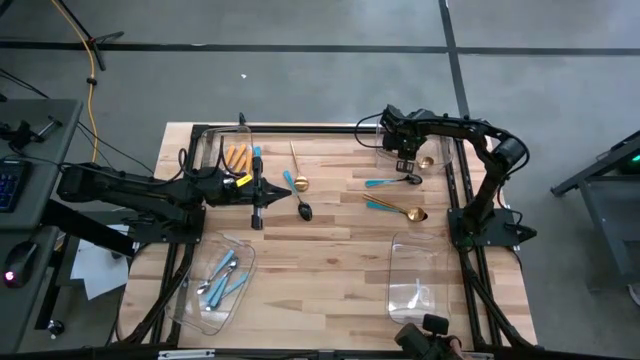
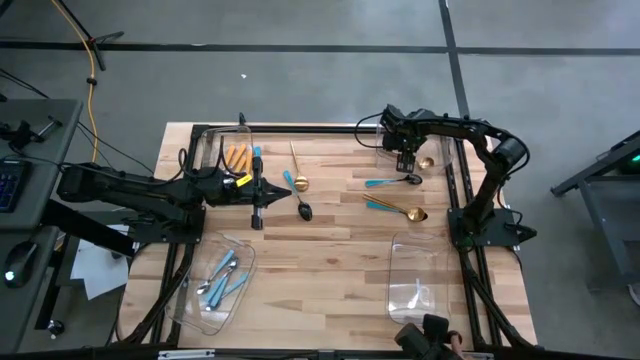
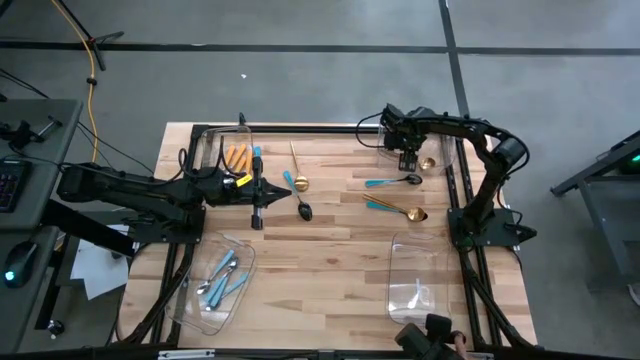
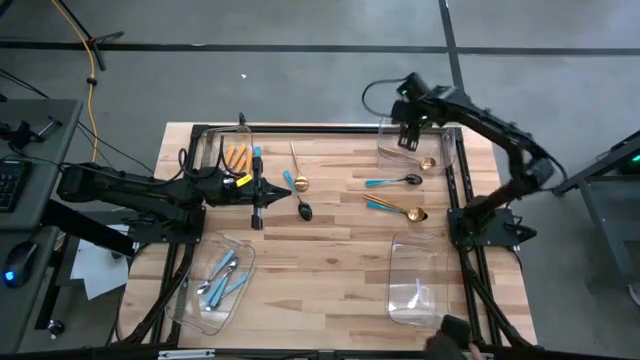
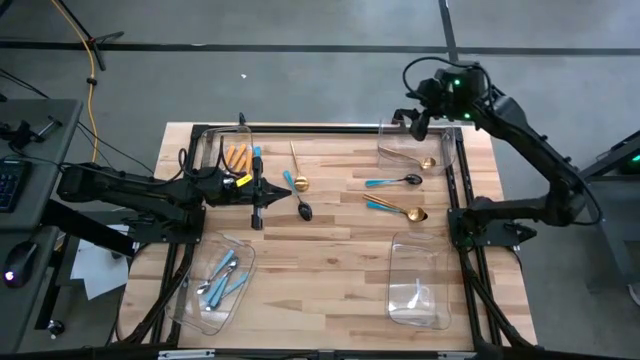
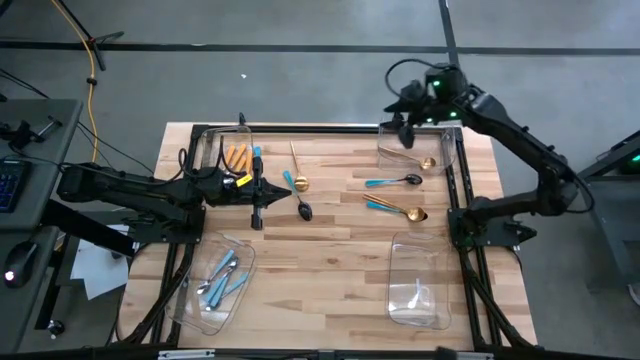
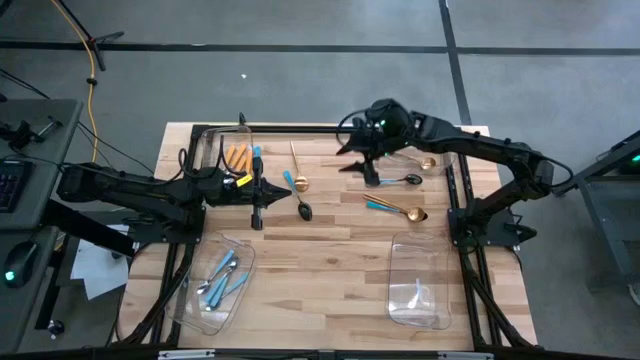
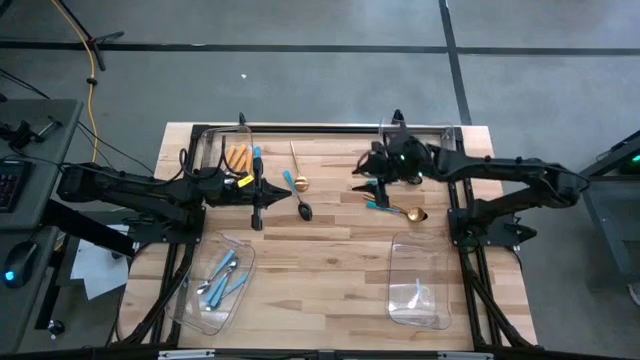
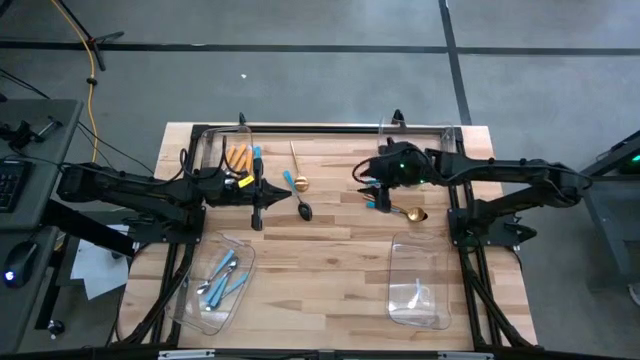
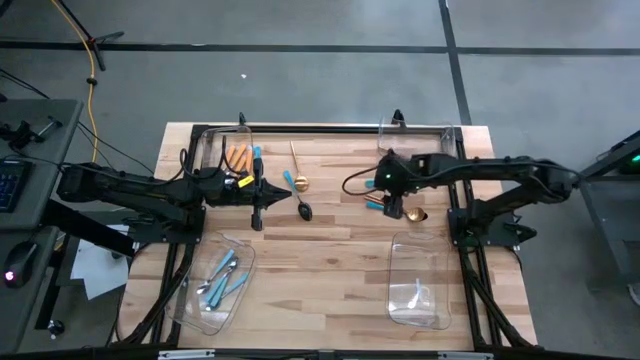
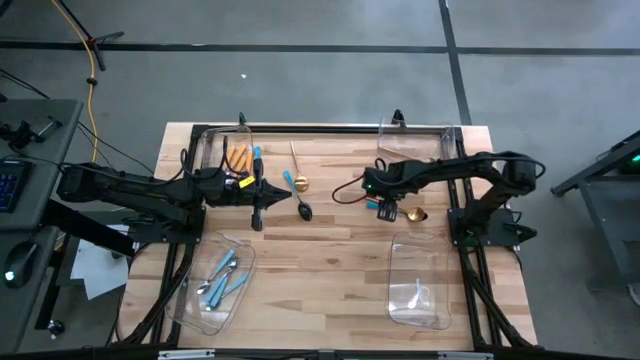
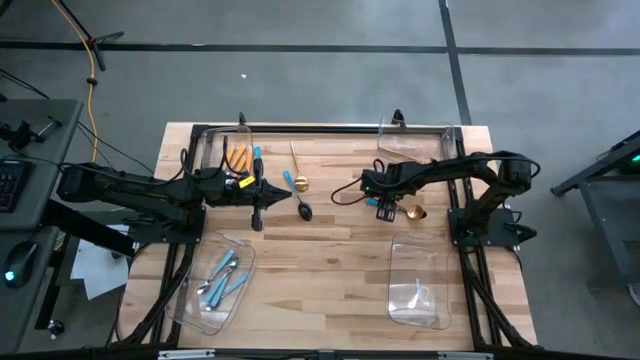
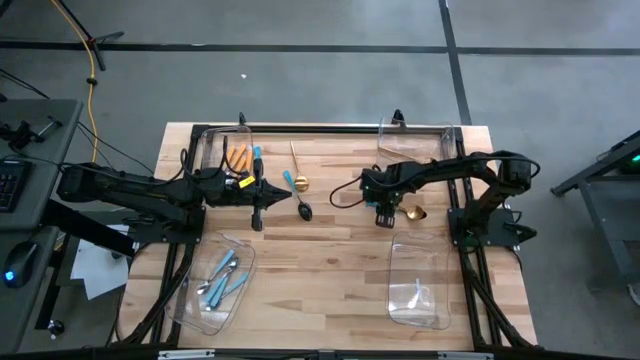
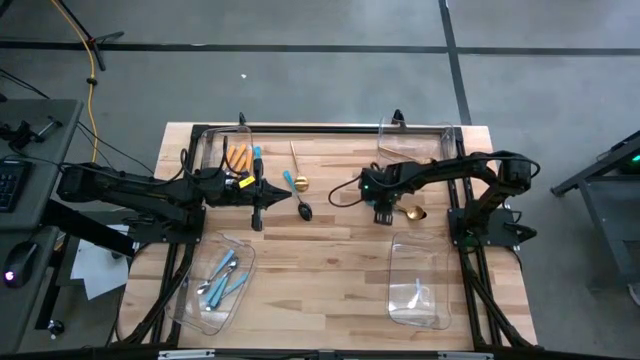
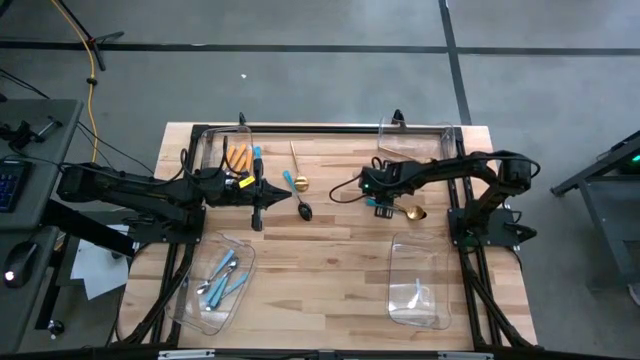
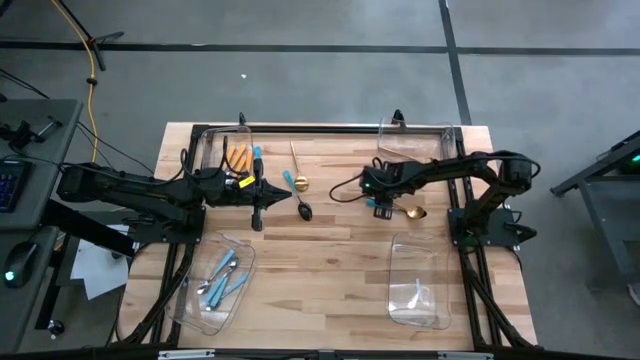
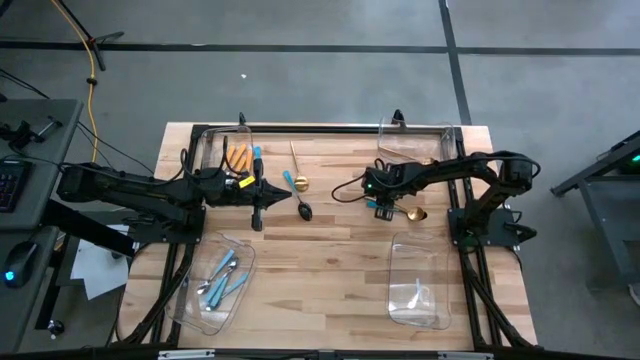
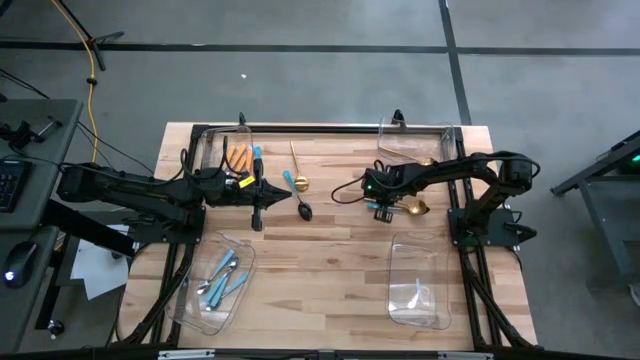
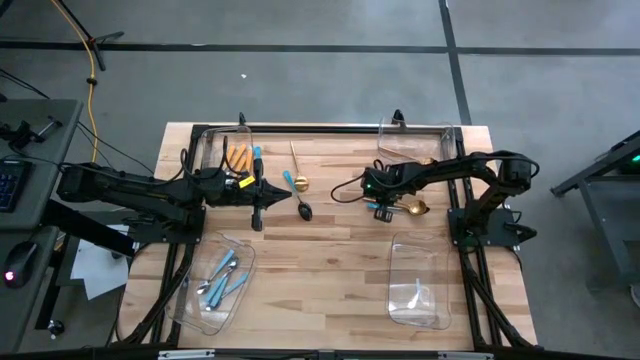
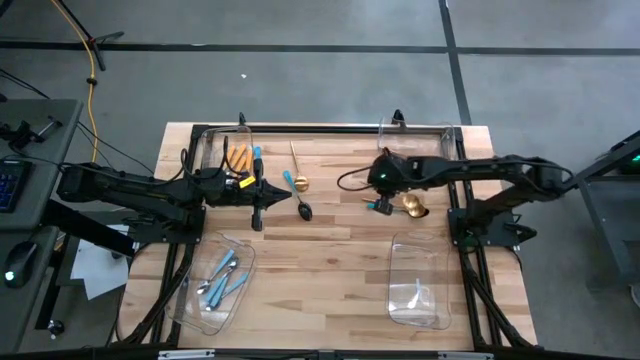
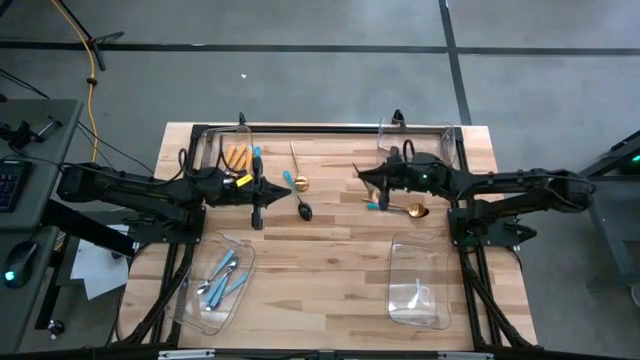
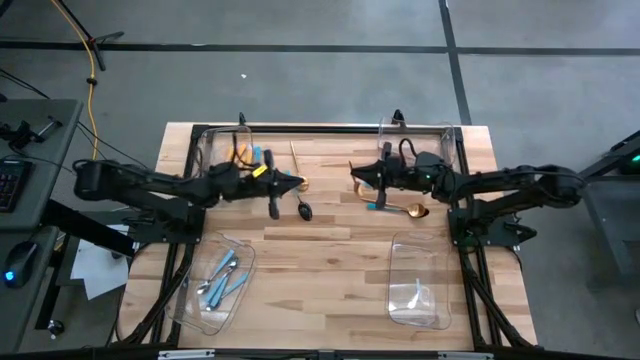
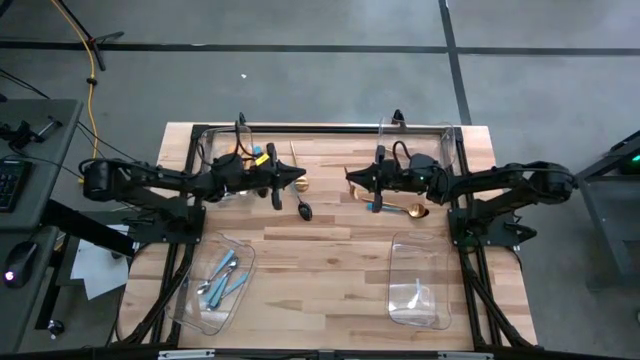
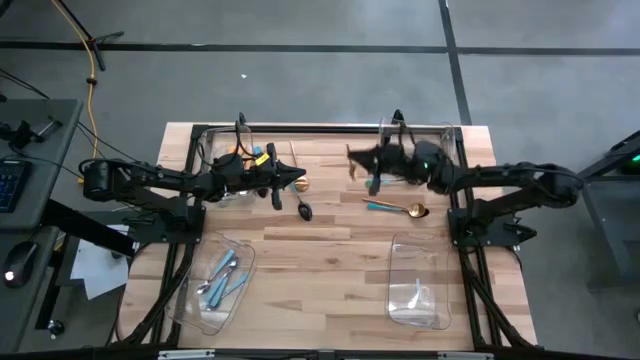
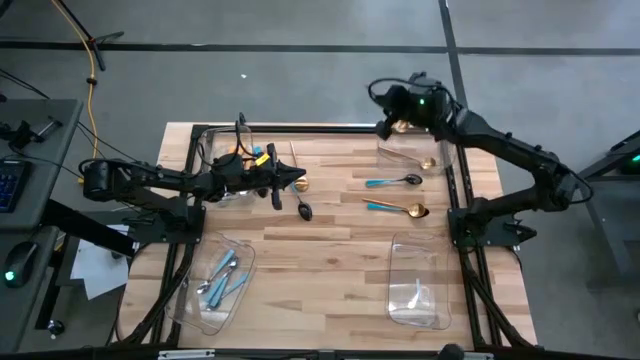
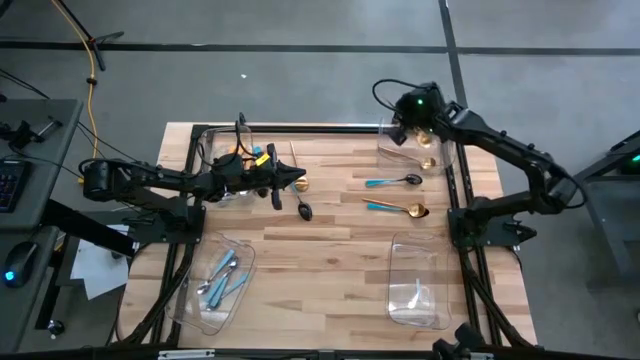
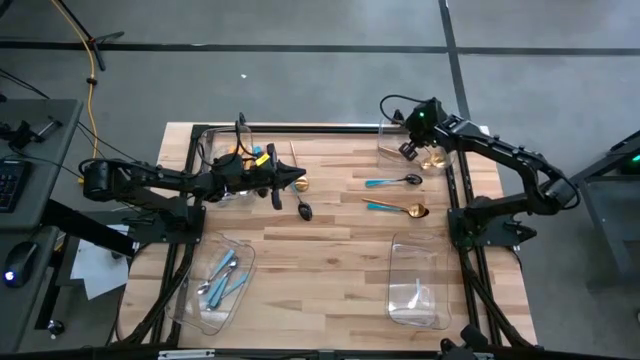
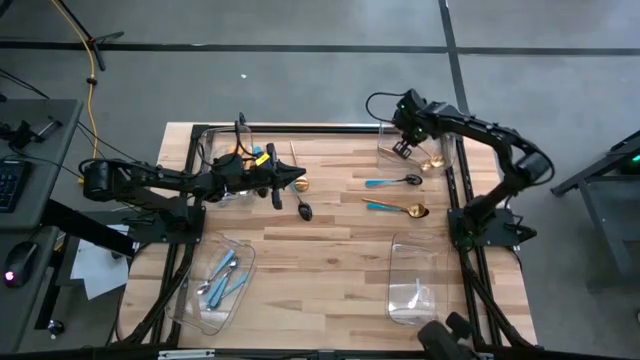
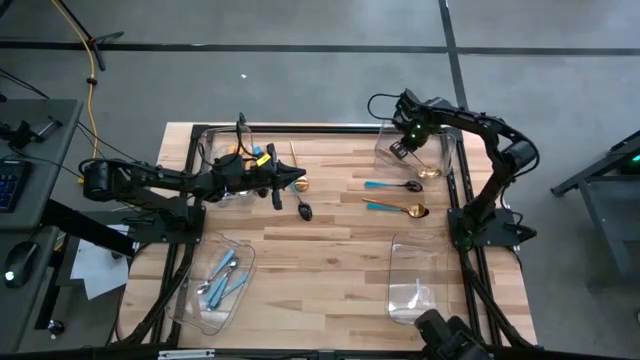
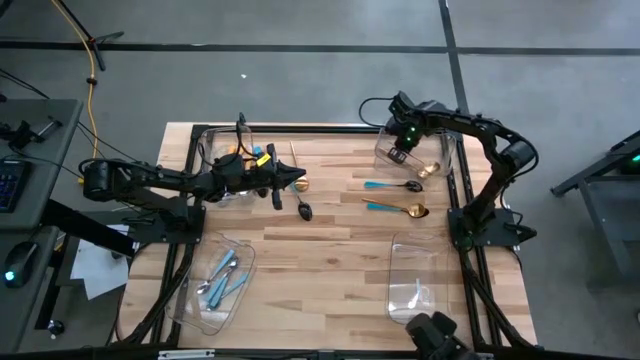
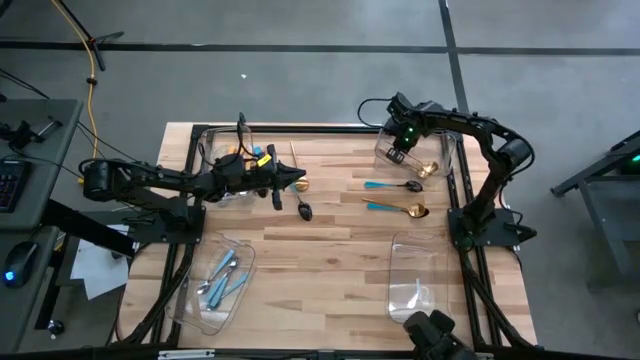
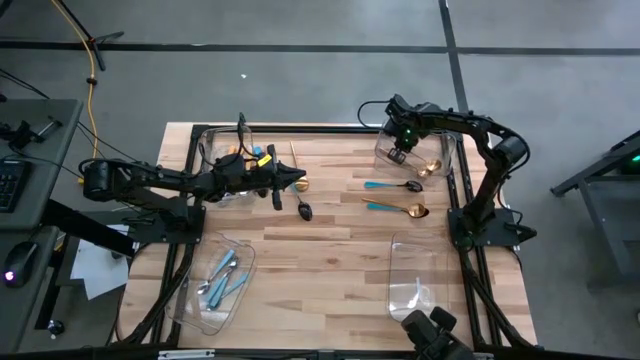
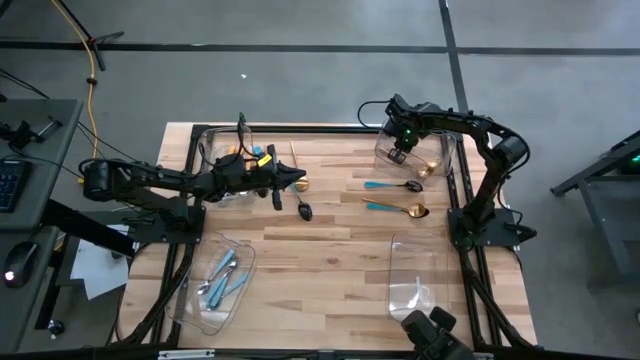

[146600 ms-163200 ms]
Task: Sort silverware by color (type)
Put the gold spoon into the top right transparent bin

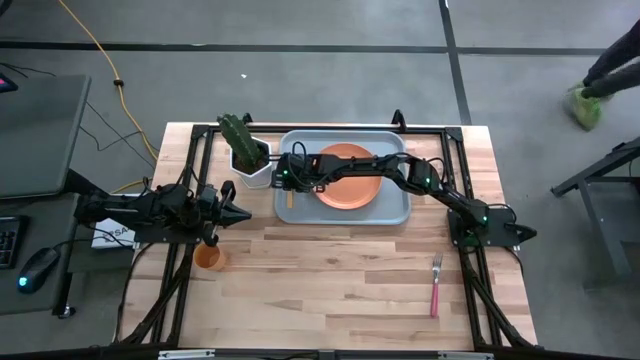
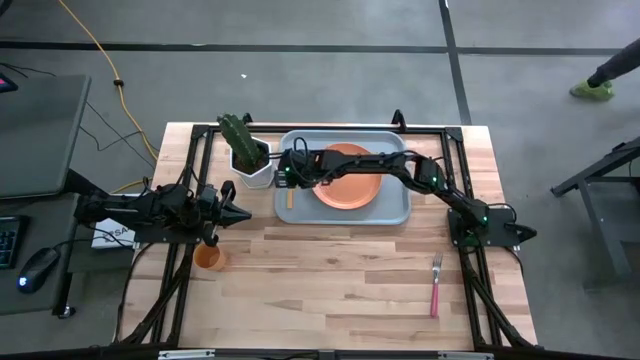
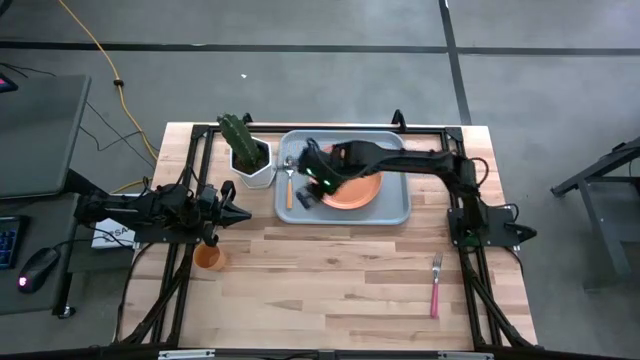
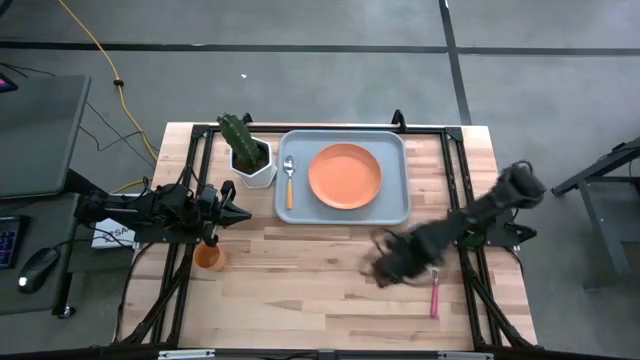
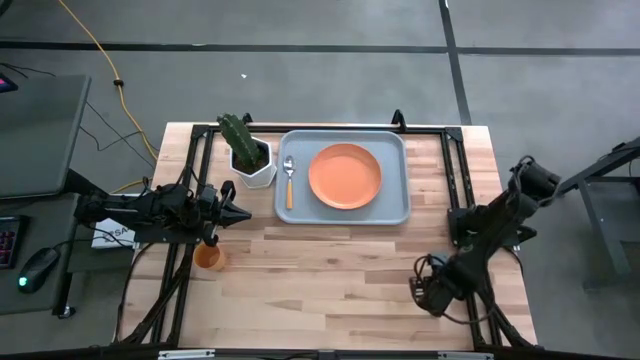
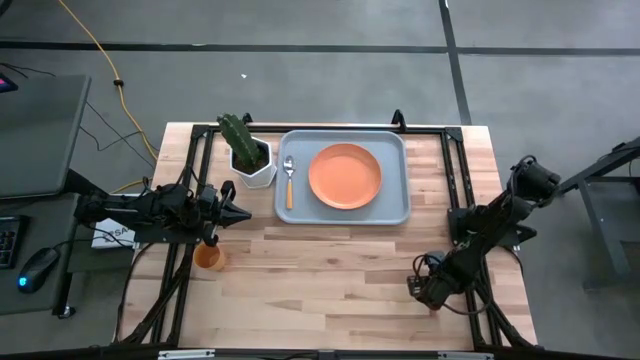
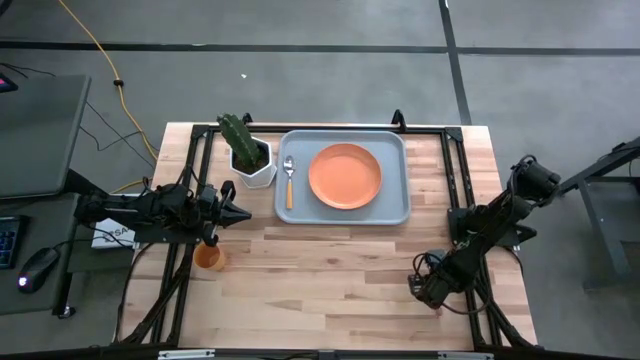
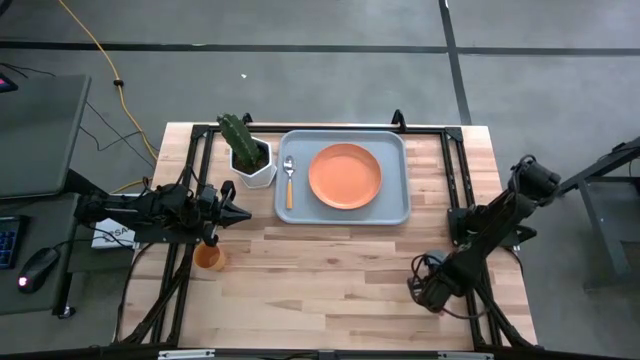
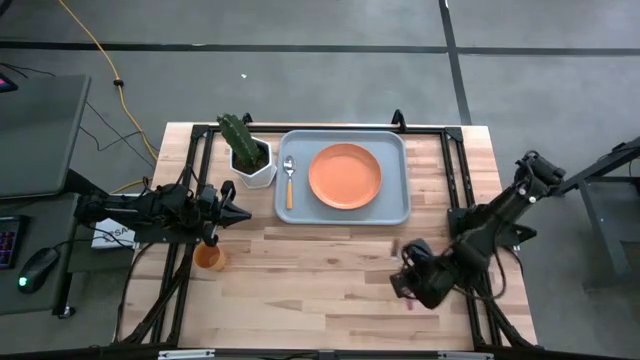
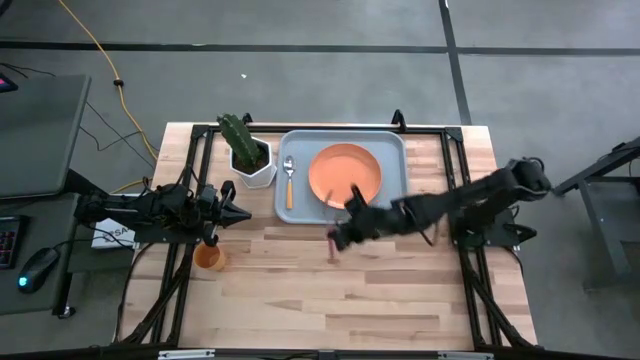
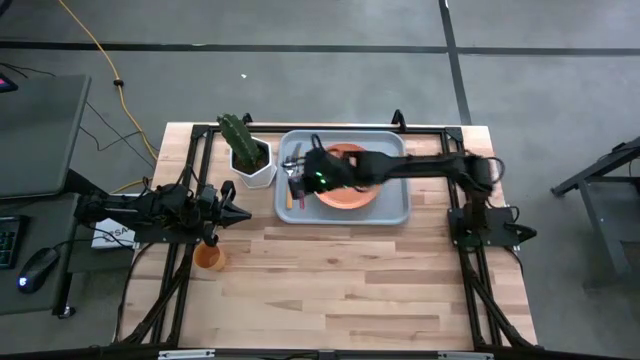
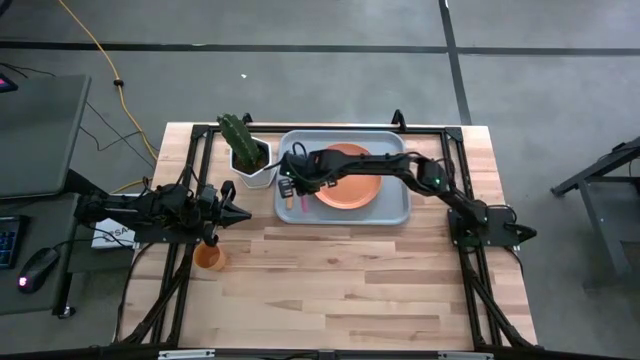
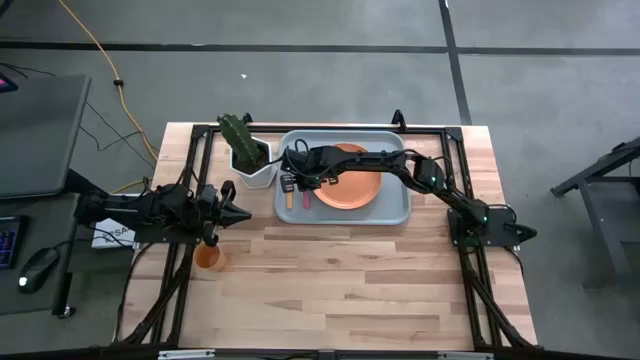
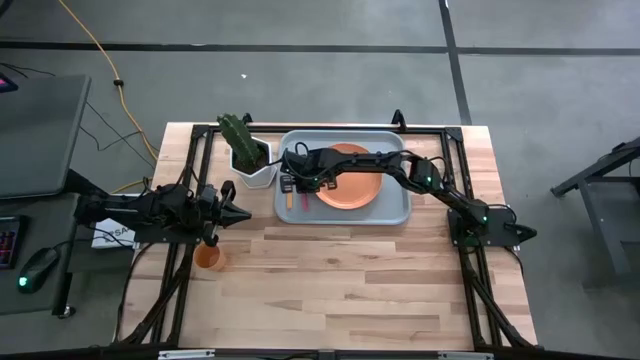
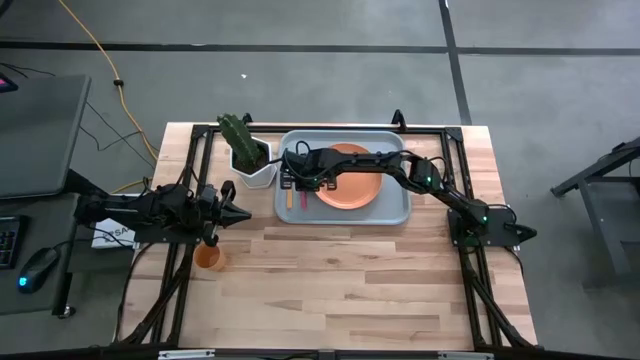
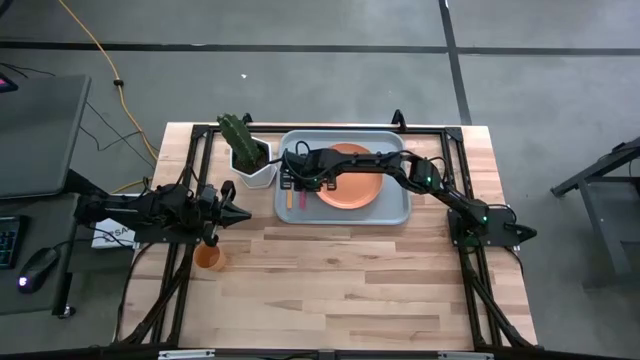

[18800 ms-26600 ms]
Task: Pick and place plate/cup/fork/spoon on tray
Put the red fork on the gray serving tray to the right of the yellow spoon
